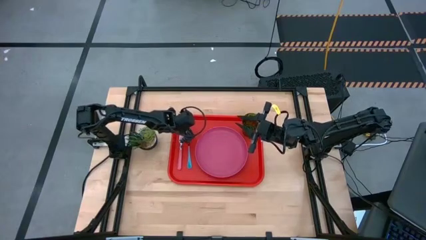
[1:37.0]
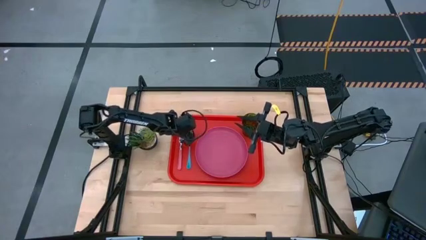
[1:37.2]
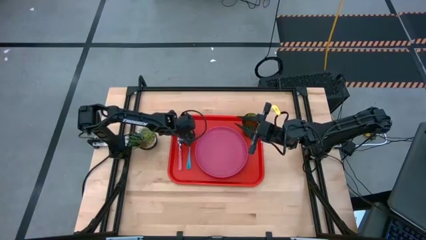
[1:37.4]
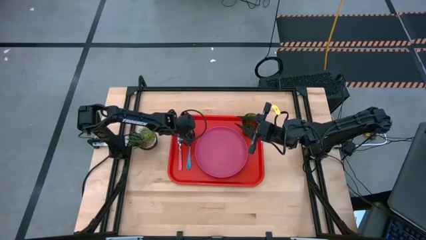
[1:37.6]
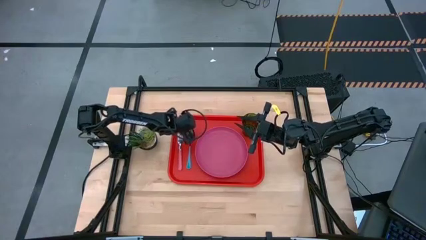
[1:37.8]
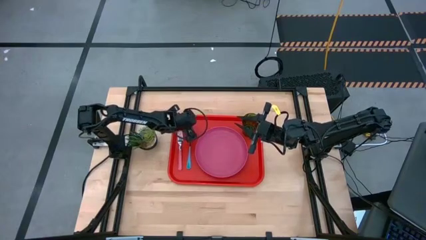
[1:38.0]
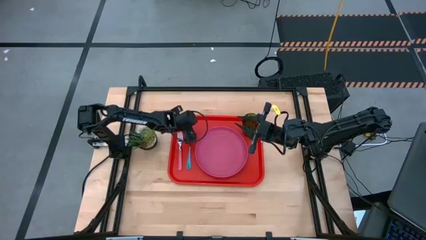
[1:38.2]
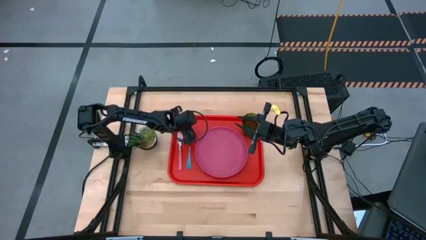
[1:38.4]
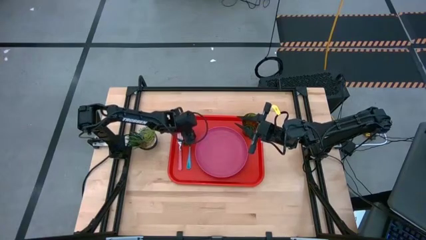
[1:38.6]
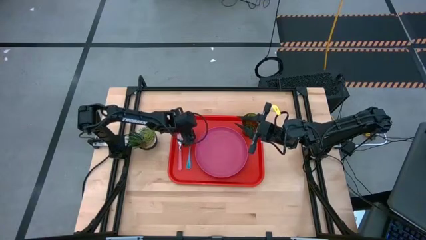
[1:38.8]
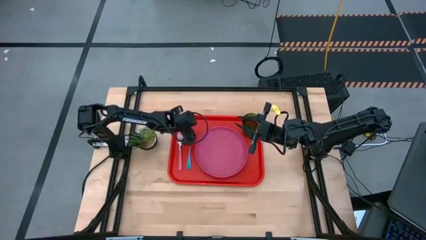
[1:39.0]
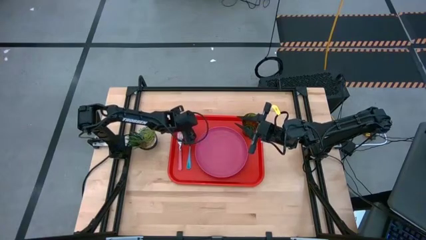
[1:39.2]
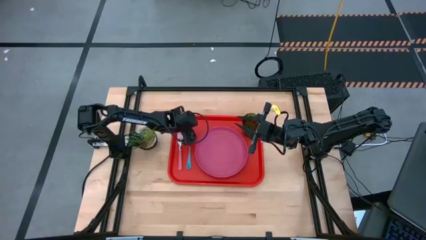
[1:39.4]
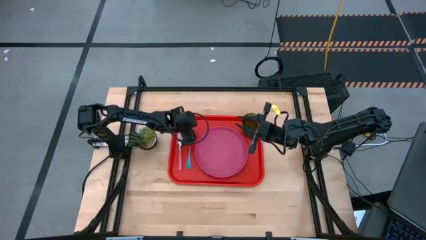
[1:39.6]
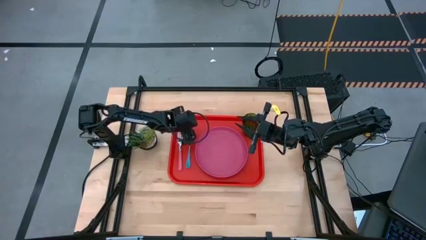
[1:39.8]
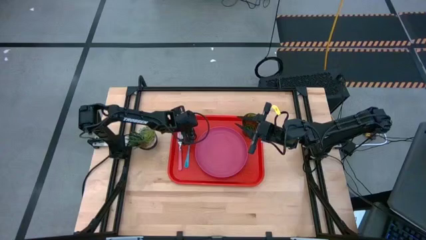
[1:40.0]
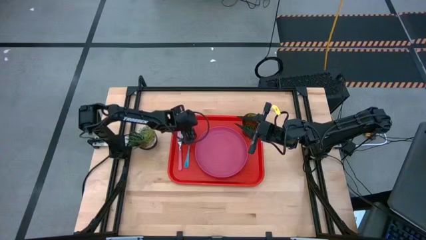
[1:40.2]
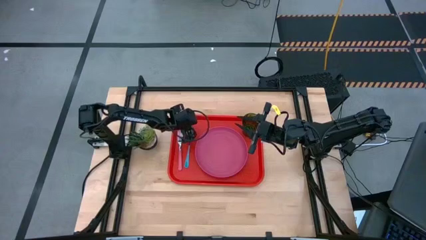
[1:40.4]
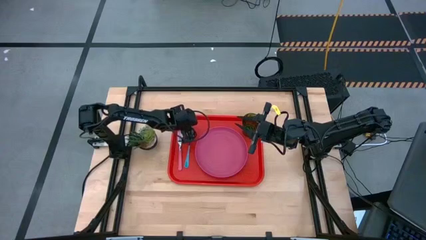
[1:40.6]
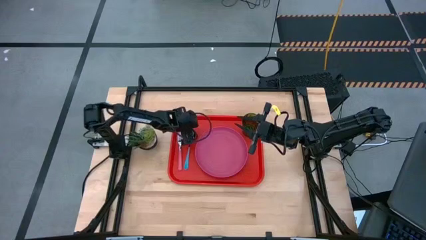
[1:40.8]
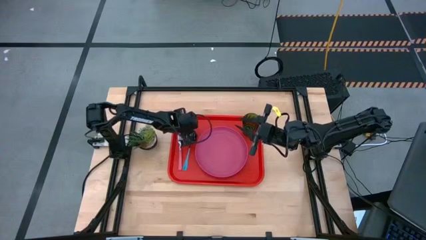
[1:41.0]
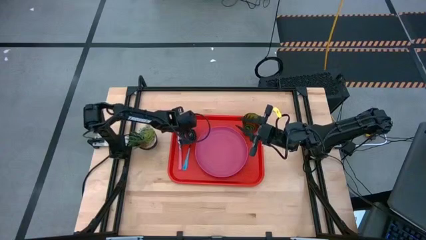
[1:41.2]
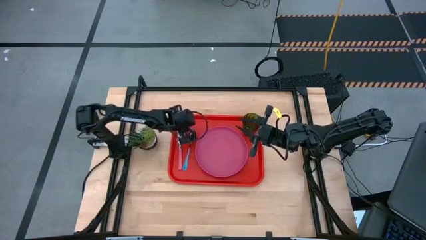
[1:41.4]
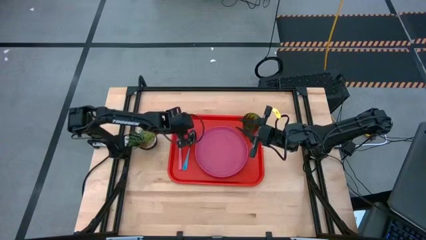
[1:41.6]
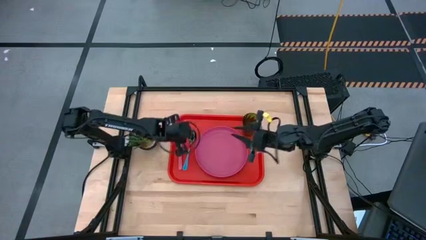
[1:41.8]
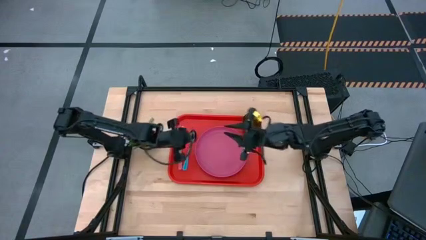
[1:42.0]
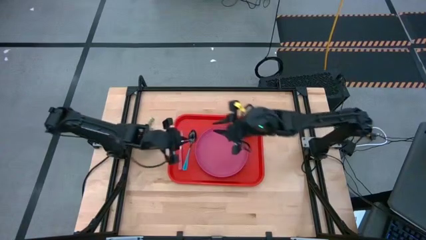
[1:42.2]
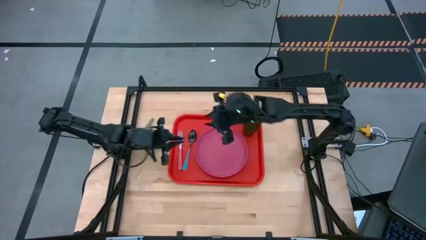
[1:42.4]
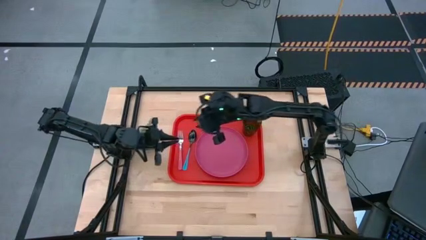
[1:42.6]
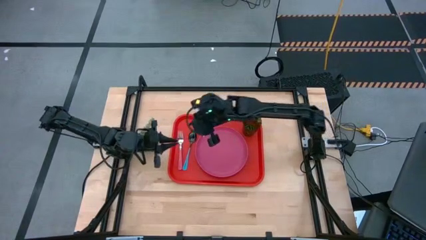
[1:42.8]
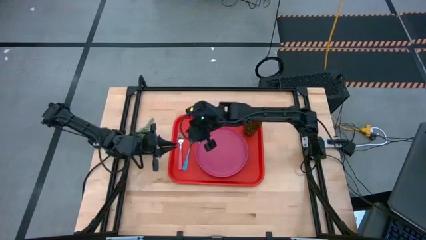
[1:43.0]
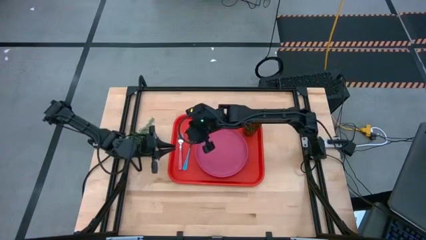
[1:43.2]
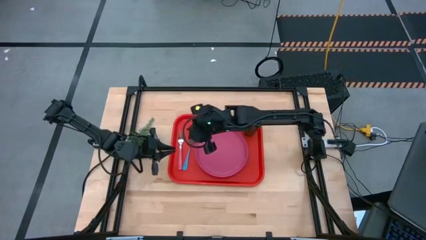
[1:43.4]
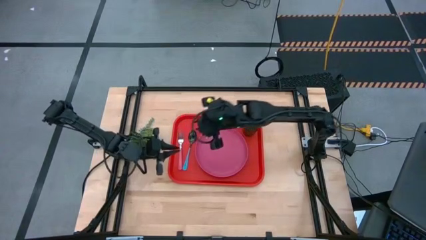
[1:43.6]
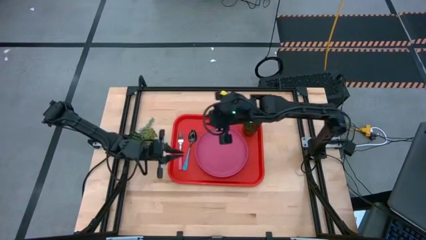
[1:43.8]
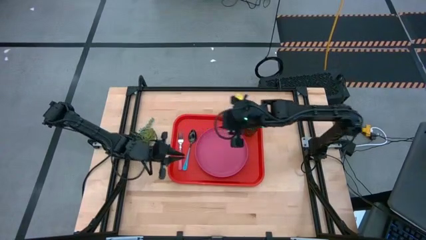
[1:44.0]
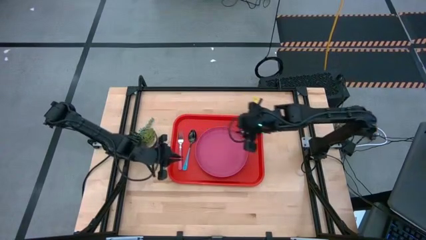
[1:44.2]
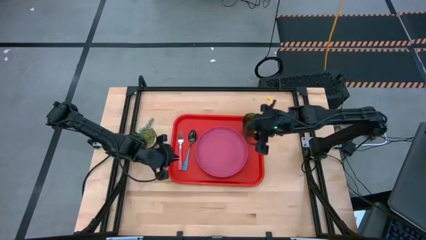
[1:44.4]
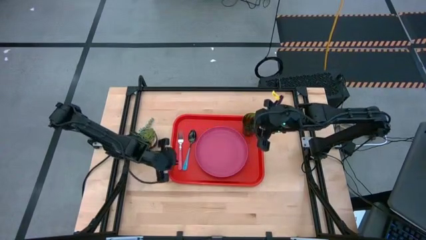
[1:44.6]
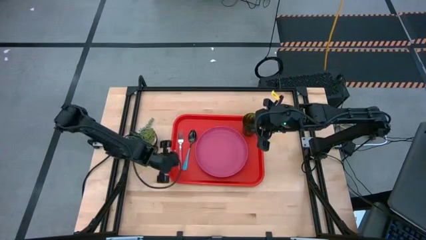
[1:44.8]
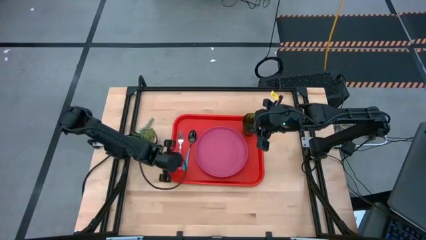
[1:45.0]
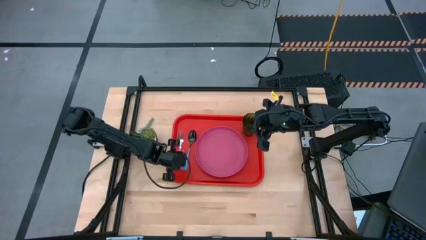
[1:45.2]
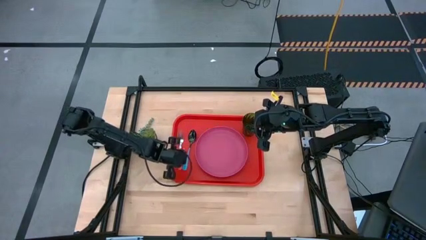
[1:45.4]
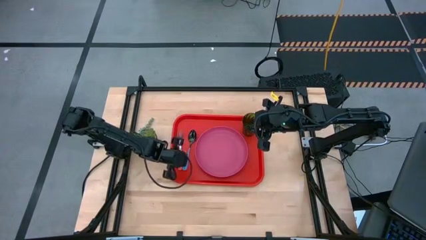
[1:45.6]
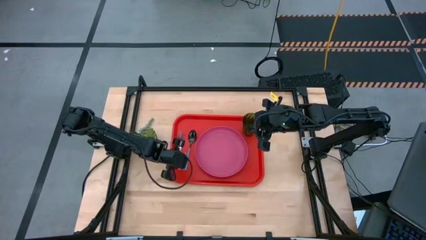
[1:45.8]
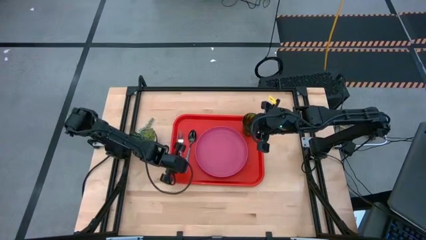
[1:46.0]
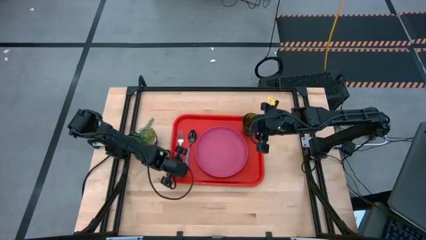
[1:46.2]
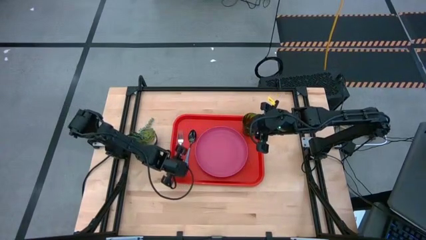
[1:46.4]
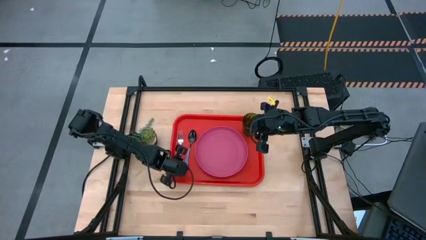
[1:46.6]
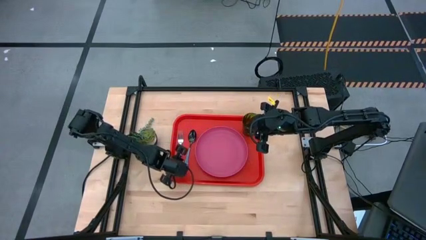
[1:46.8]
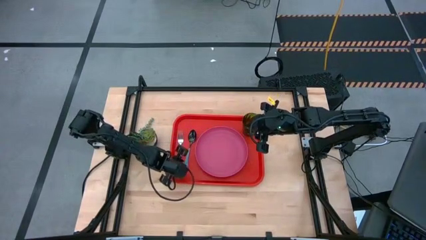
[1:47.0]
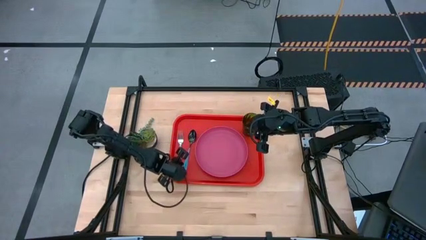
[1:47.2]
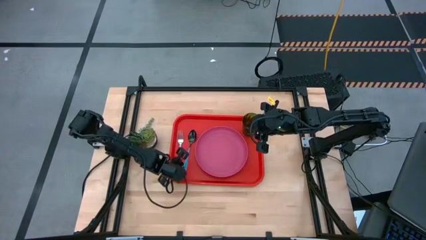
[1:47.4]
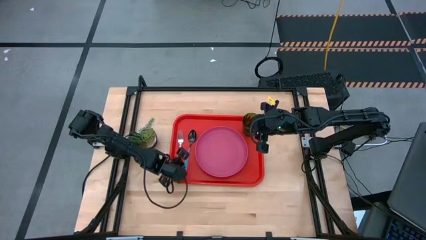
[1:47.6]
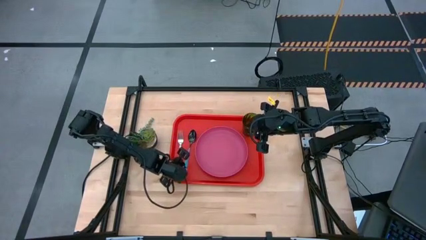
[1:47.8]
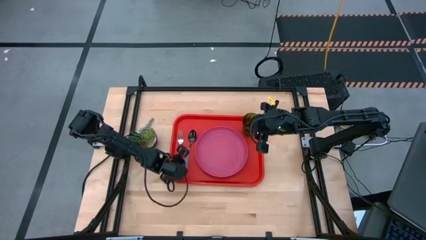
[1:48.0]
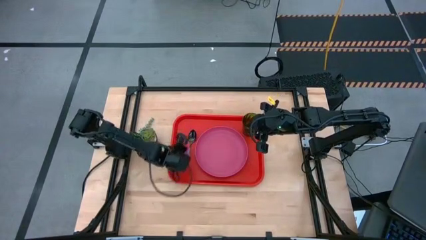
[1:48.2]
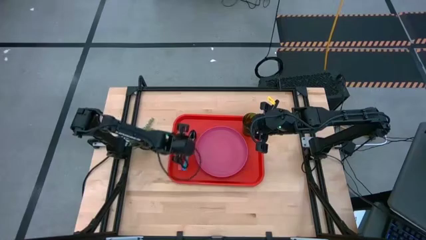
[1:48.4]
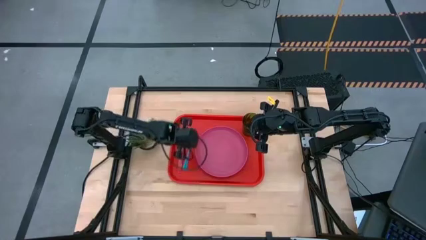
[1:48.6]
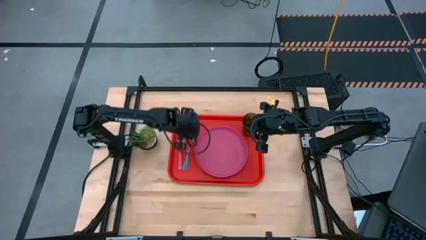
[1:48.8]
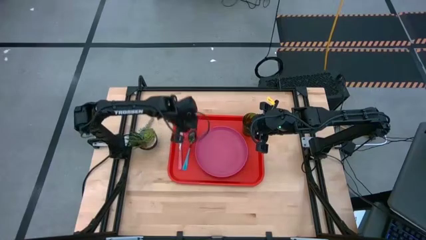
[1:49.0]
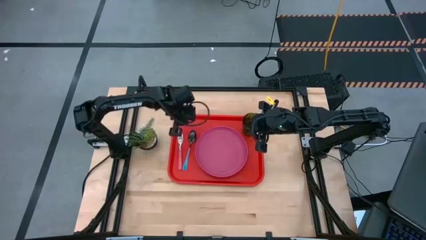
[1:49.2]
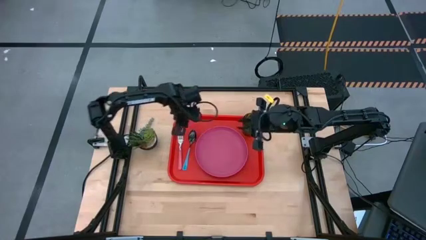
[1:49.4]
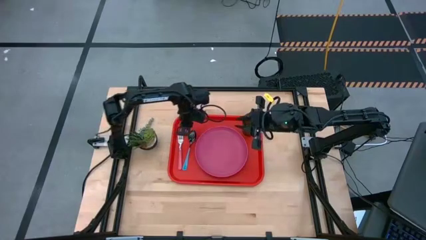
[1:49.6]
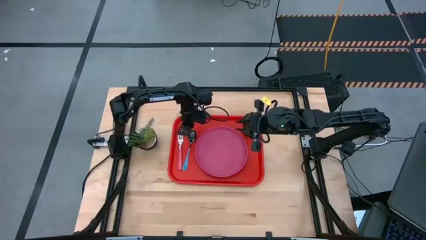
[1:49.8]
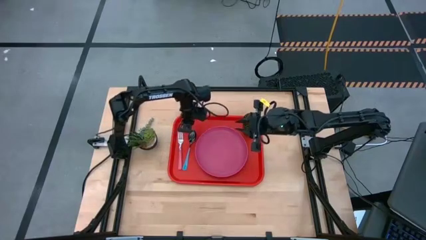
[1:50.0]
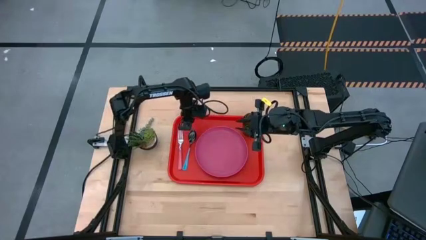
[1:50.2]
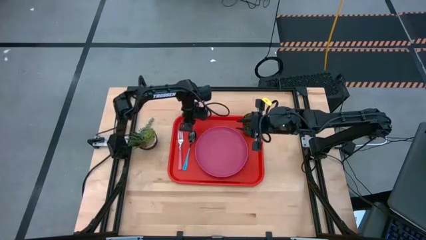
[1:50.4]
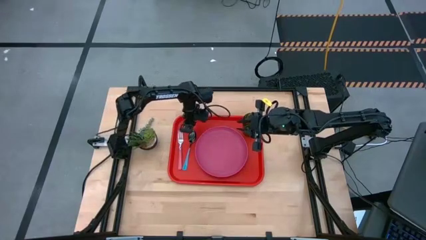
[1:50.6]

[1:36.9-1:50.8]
Task: Pick and place plate/cup/fork/spoon on tray
Adjust the silverware on the red tray

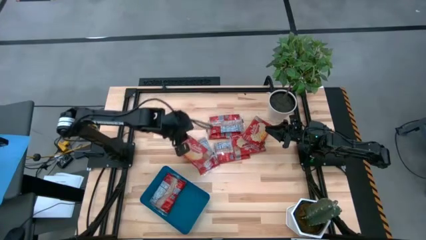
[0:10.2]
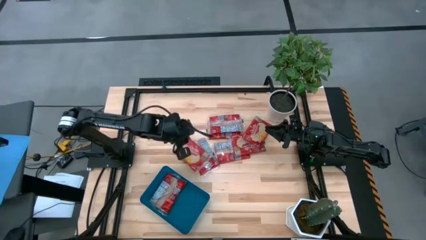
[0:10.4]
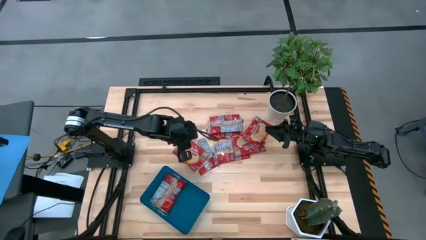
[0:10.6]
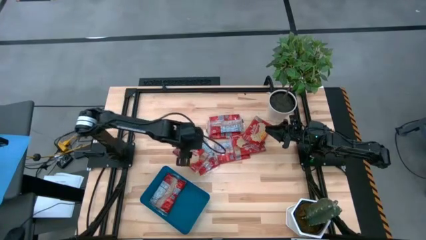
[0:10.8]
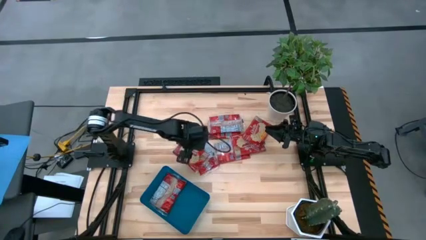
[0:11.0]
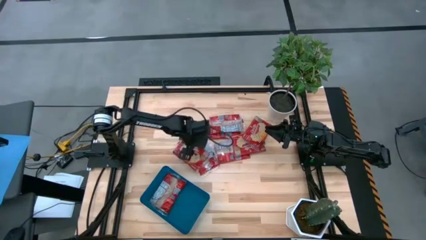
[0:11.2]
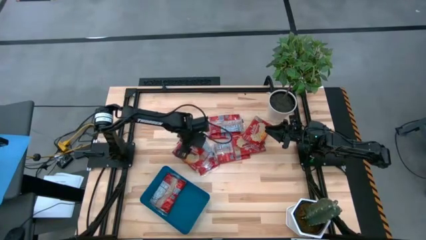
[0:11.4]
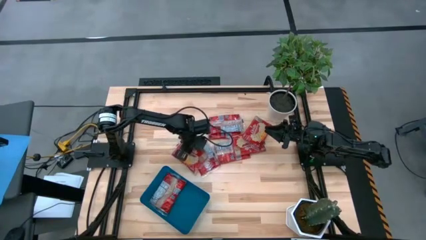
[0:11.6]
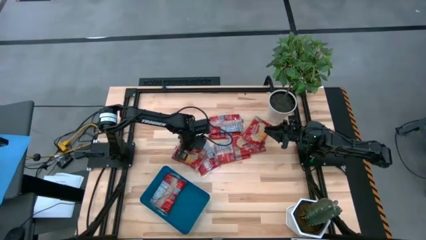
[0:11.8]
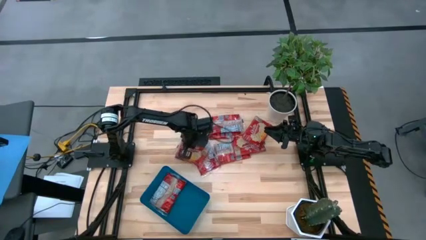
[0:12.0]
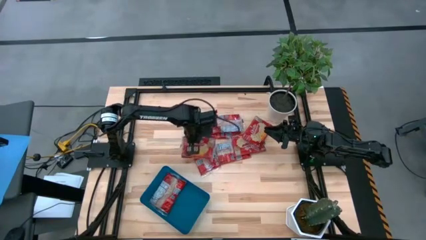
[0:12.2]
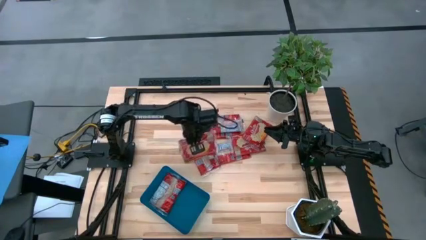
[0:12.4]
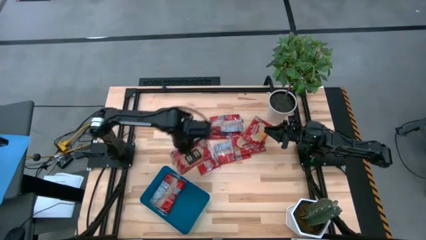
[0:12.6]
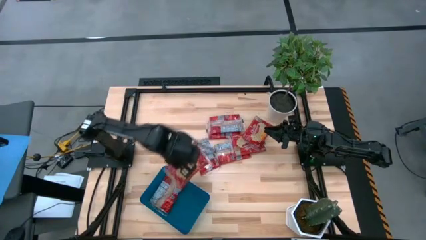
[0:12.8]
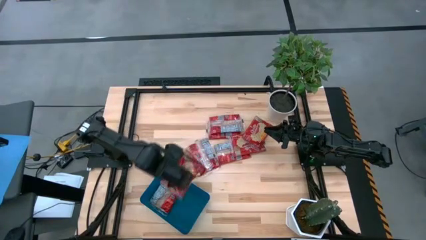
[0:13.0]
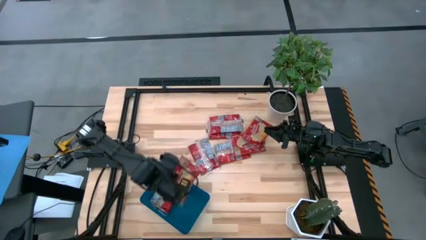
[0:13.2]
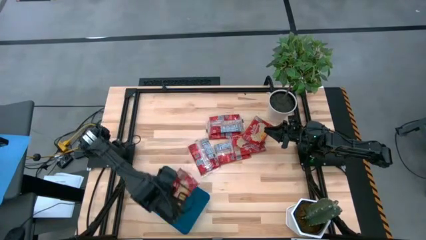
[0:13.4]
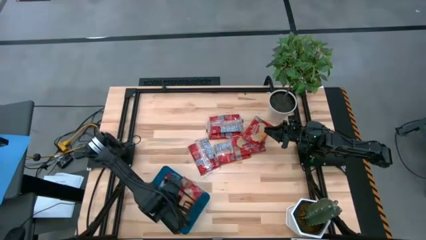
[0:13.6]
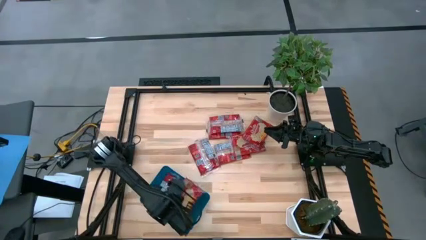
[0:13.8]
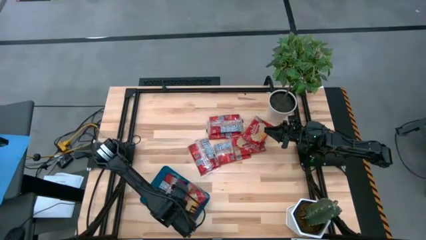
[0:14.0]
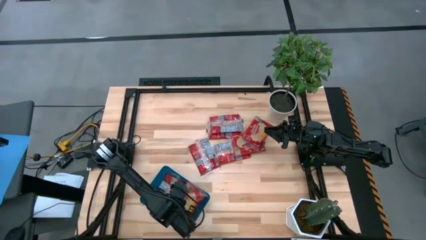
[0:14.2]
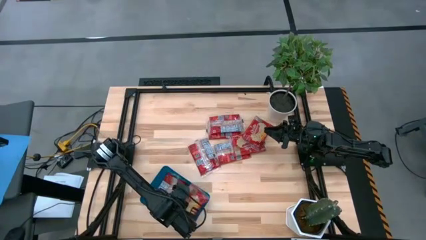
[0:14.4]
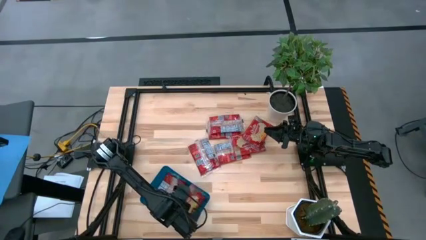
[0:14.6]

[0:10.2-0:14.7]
Task: Sort popcorn bags into baskets
Put the red popcorn bag into the blue bin
